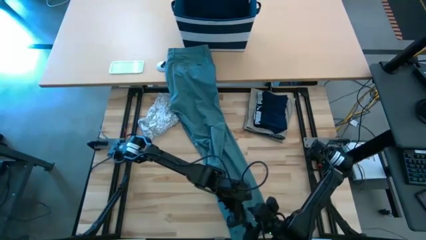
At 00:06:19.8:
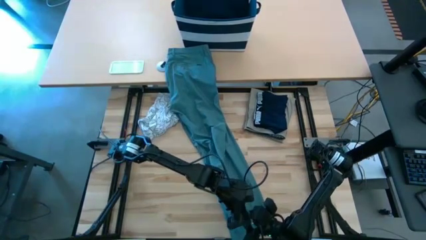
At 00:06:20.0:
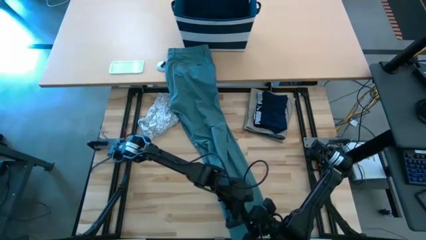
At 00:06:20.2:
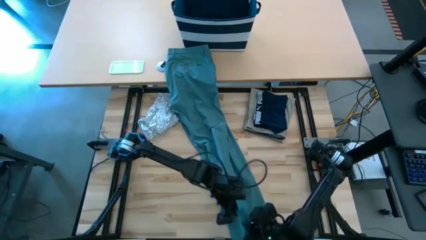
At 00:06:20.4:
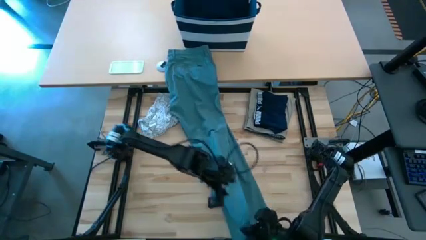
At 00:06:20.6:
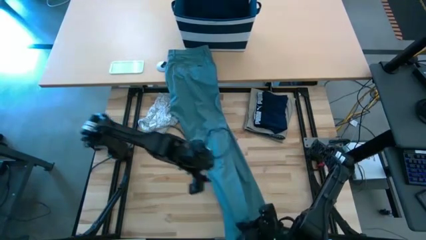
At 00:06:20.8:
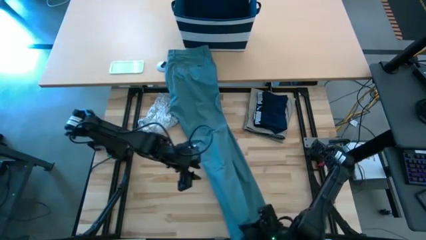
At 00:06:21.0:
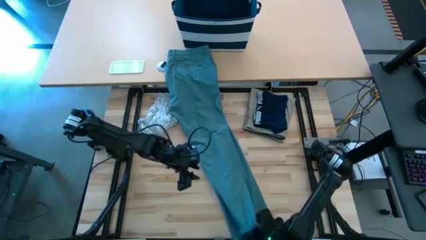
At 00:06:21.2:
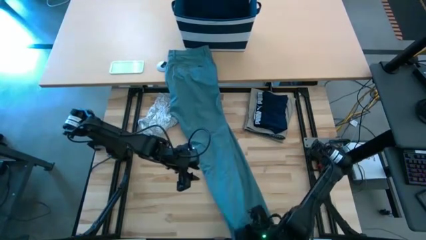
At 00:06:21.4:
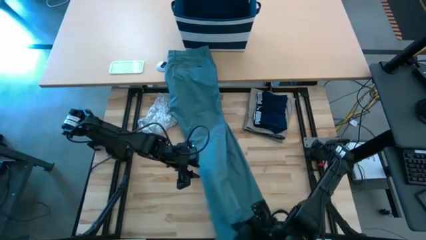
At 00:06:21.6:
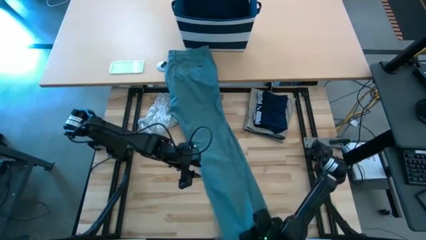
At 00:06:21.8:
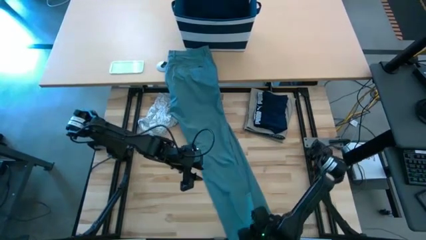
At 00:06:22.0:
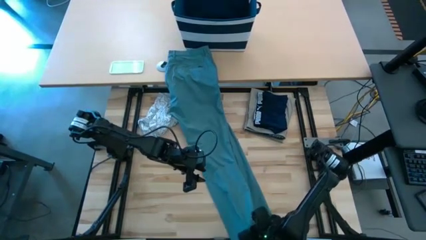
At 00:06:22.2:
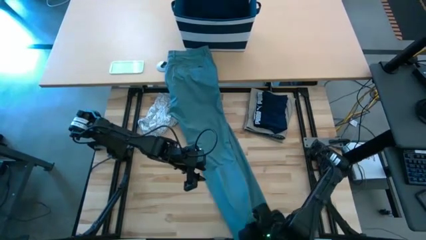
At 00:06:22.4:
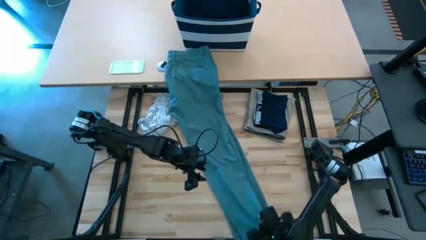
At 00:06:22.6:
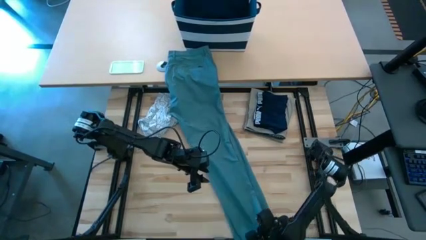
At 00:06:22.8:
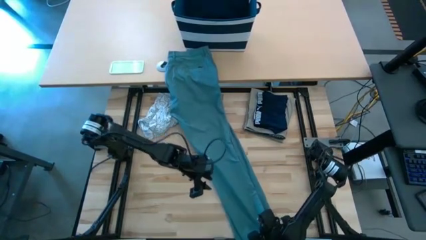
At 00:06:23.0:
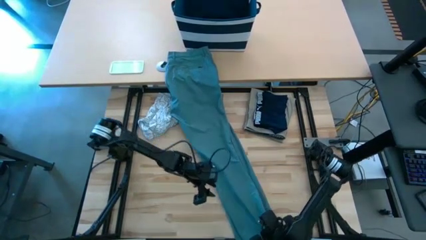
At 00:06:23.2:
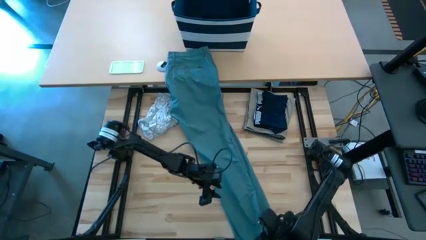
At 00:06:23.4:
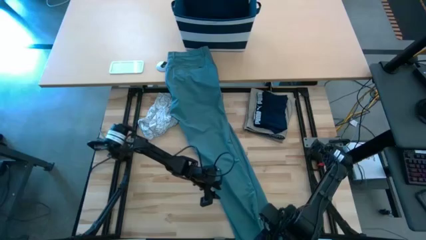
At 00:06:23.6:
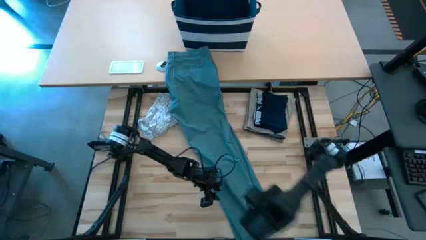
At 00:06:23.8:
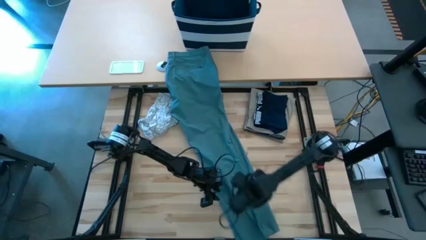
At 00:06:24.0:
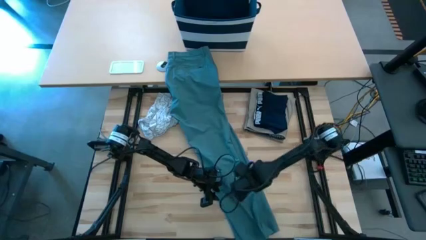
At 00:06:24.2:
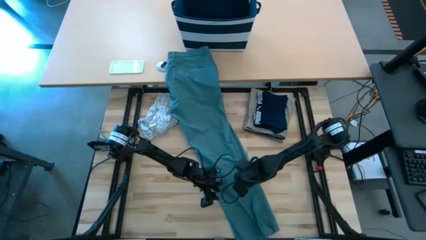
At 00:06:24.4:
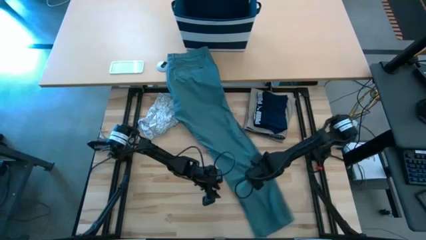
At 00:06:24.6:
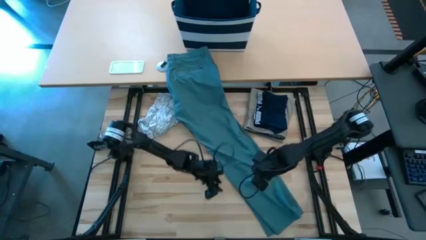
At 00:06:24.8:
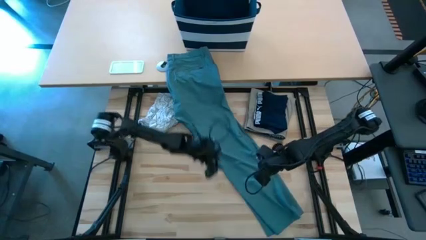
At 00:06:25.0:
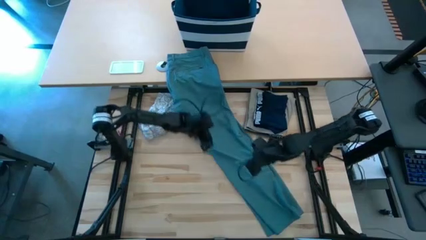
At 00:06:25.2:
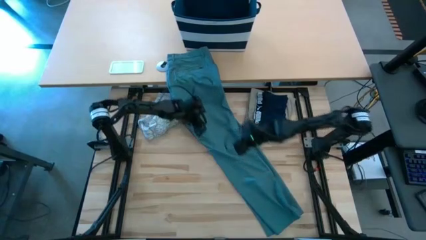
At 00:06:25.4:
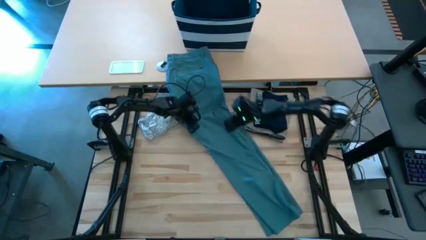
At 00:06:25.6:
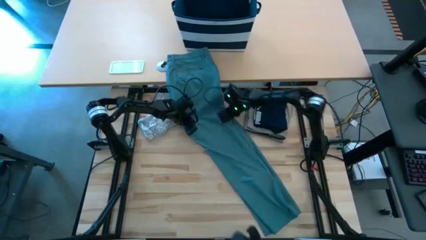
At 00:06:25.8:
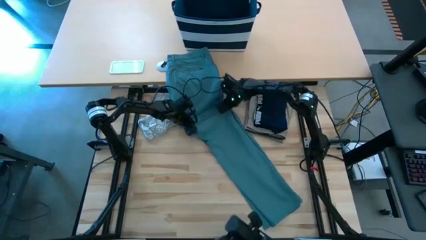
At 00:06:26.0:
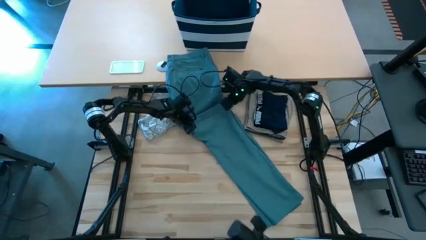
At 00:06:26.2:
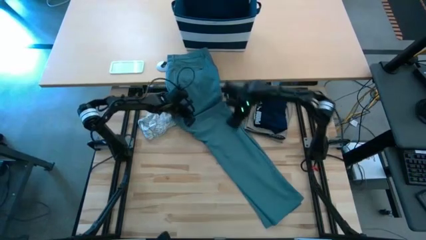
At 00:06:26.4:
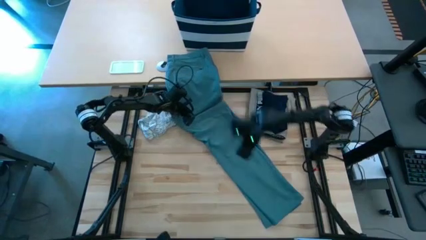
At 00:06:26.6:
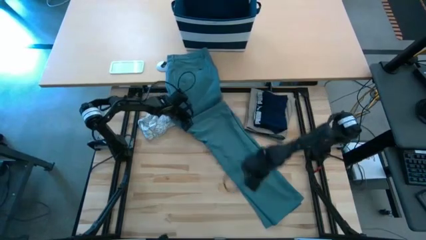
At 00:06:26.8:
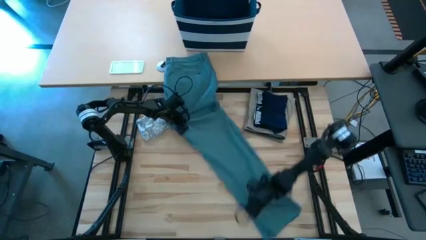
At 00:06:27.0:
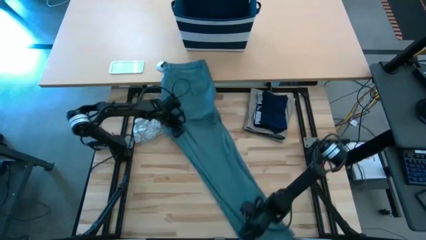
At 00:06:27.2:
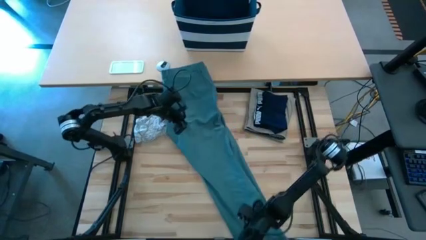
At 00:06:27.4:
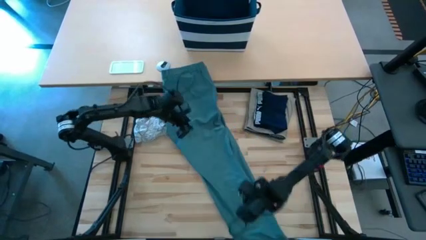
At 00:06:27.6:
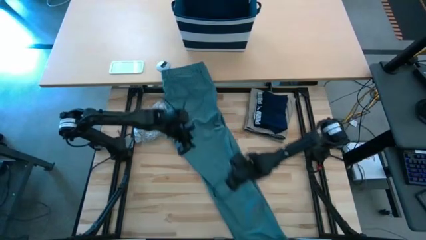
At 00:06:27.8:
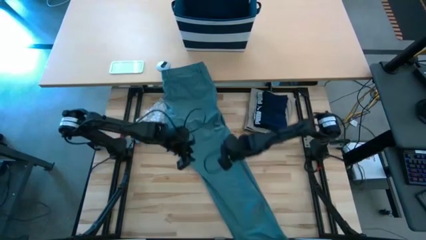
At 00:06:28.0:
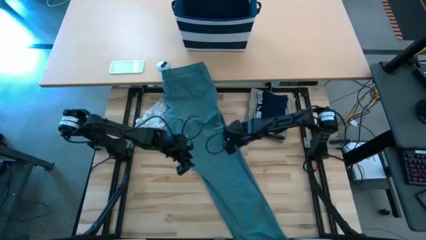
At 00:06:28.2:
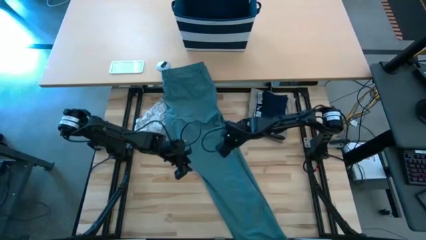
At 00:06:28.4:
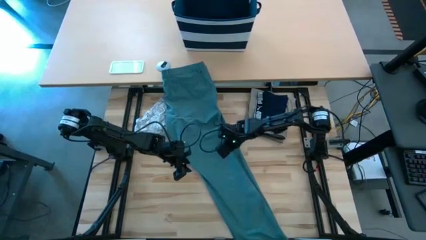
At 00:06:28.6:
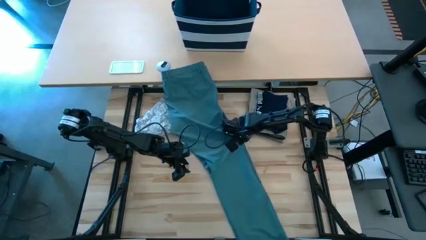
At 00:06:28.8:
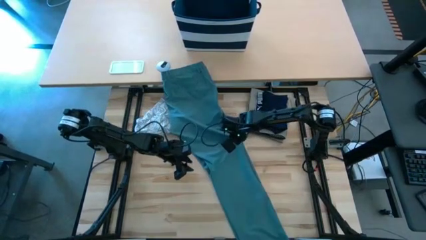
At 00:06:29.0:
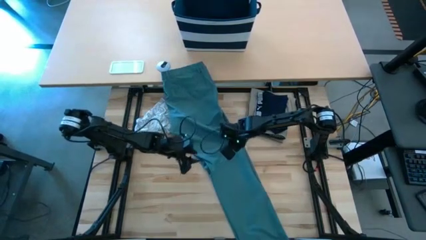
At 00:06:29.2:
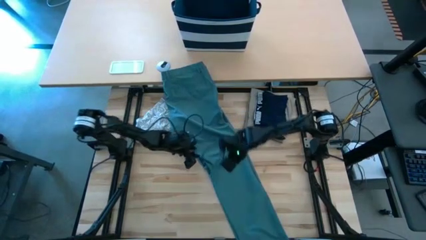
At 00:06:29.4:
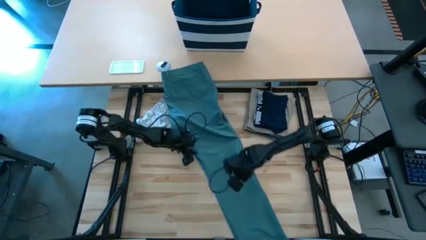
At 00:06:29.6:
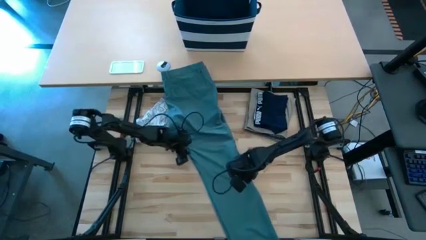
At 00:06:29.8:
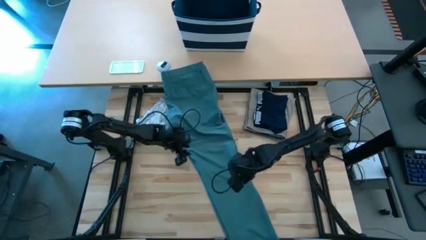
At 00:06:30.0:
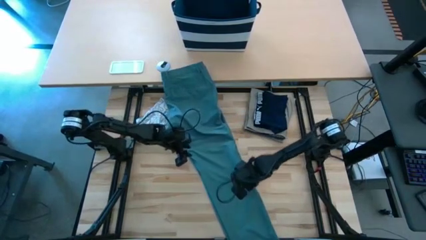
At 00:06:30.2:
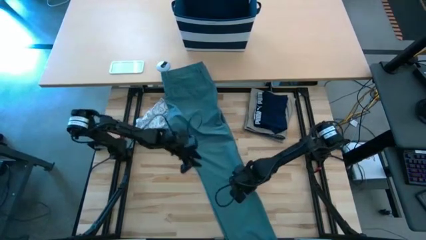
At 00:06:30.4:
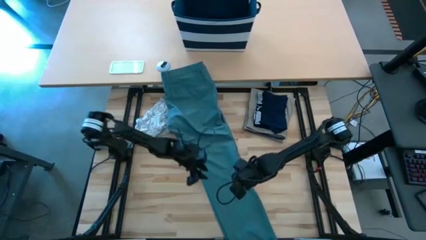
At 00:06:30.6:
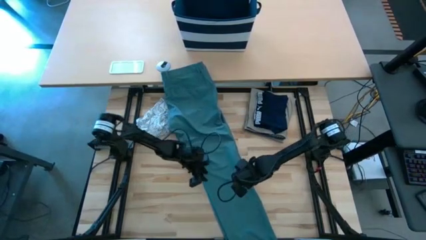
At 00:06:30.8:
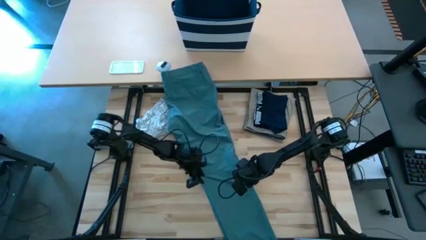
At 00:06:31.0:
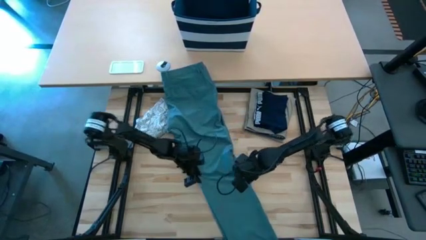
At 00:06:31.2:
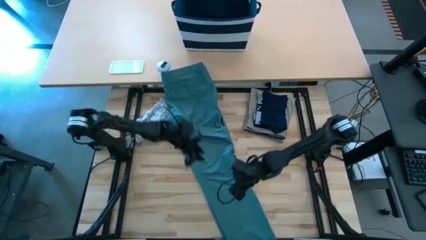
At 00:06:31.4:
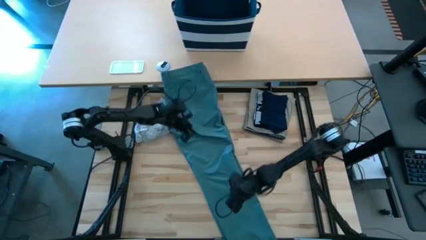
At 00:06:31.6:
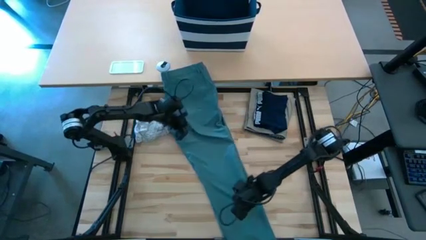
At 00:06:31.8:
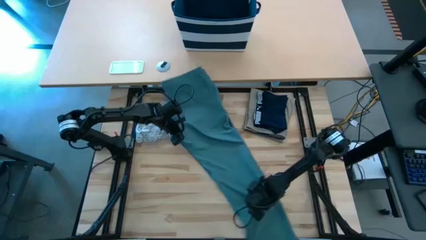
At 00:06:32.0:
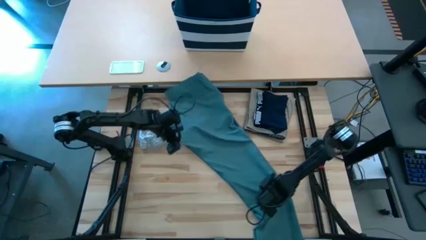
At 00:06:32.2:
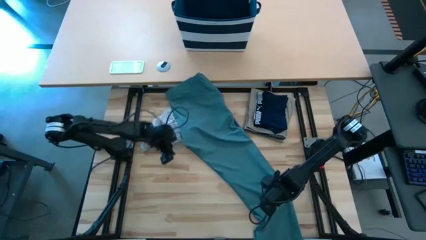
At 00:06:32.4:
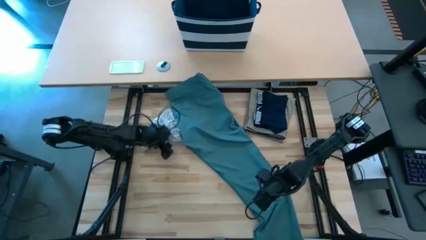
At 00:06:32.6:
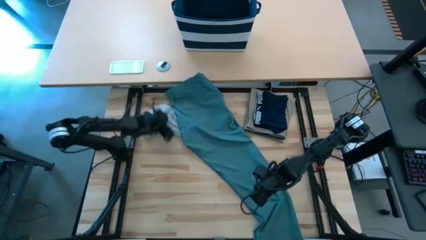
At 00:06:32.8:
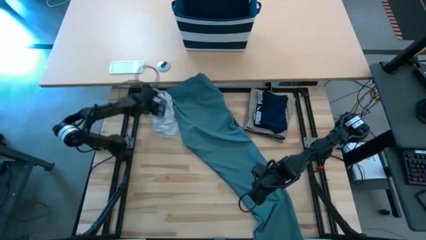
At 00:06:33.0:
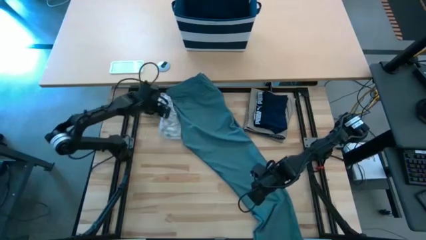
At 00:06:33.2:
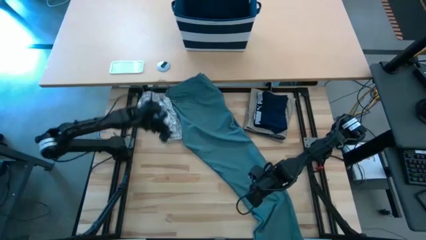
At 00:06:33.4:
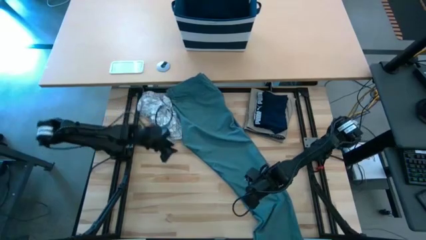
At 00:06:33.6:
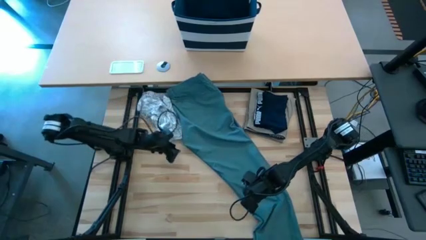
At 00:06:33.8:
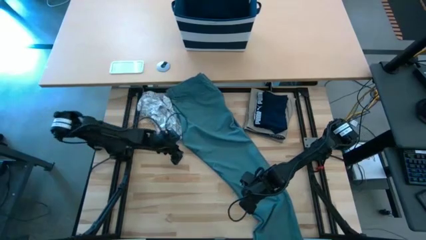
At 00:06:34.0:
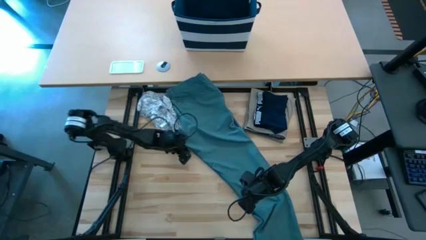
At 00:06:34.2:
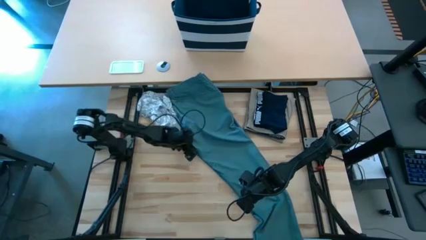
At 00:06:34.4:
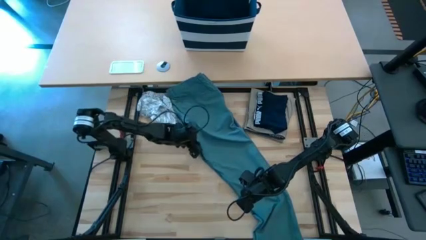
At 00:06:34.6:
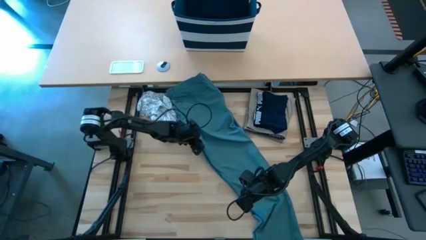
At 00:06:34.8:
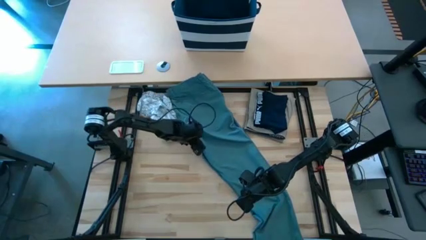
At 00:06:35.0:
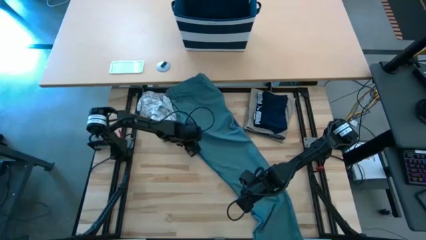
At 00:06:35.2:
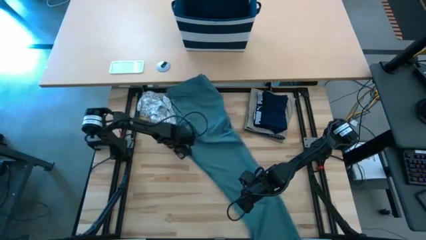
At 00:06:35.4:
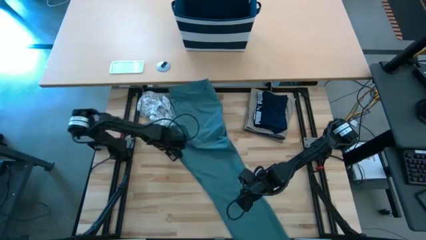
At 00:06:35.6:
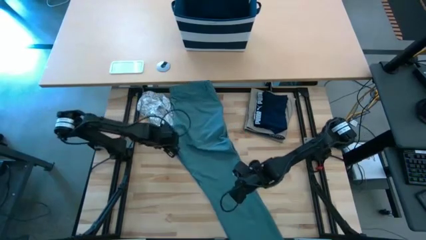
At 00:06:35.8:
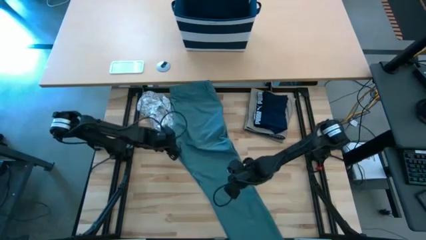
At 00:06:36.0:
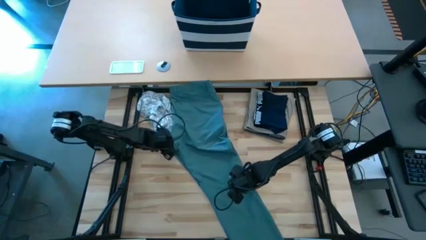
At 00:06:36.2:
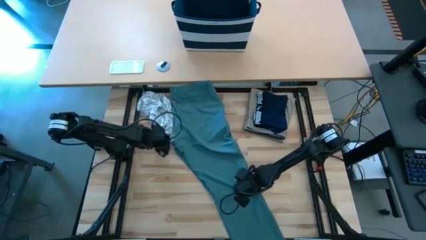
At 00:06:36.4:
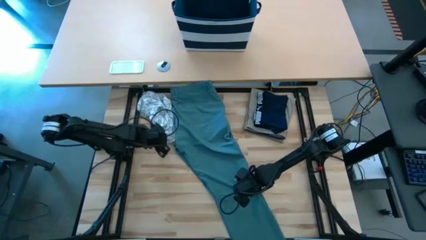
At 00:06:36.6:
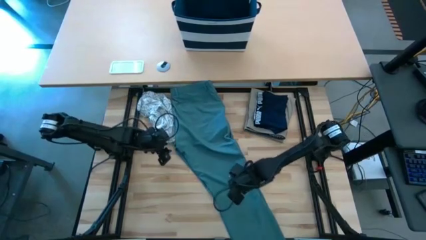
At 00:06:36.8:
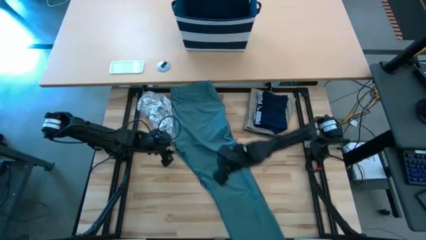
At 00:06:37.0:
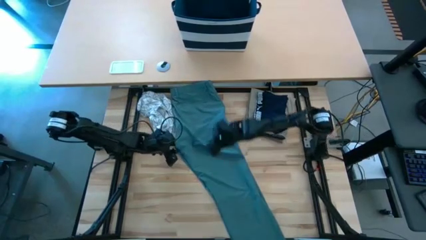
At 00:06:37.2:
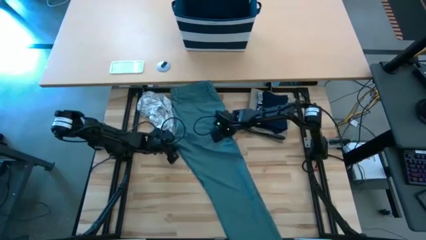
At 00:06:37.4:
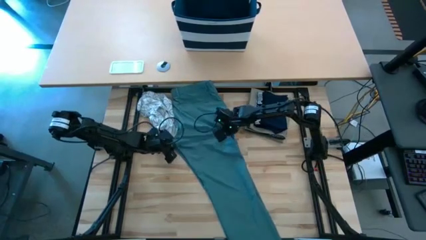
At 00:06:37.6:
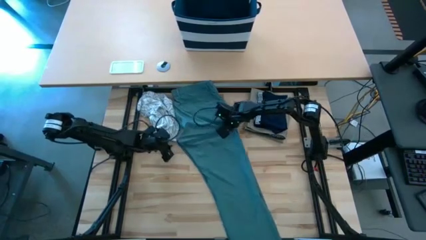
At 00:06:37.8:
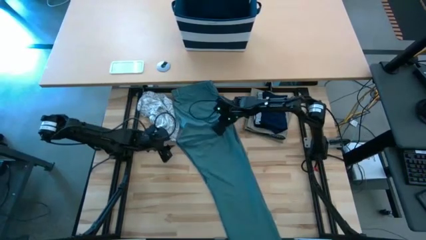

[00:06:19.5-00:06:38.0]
Task: Fold Laundry from Bin
Fold the blue pants
